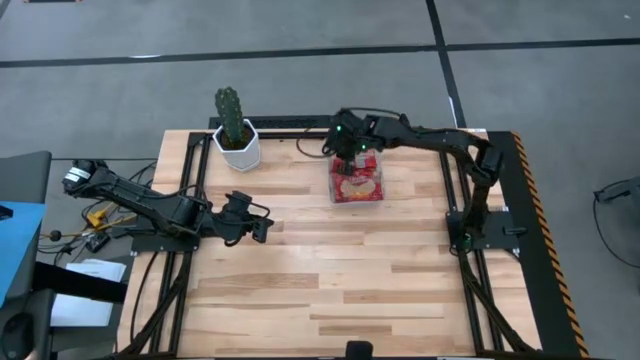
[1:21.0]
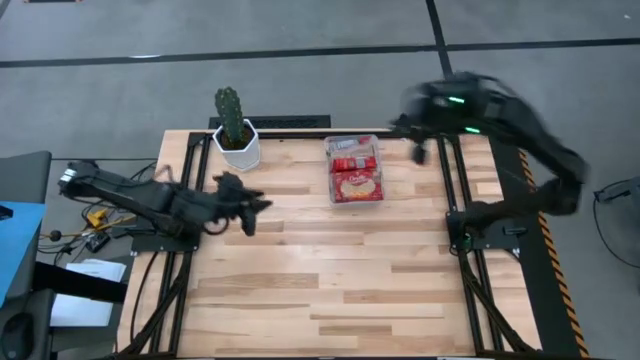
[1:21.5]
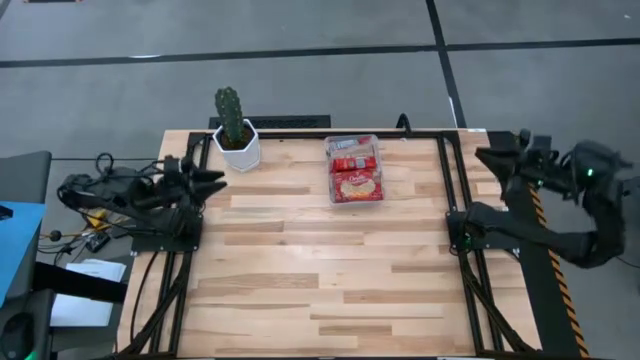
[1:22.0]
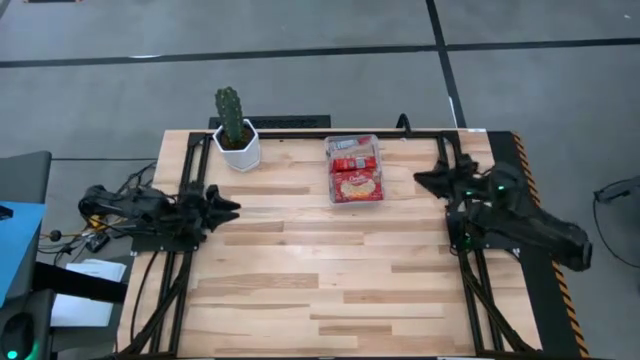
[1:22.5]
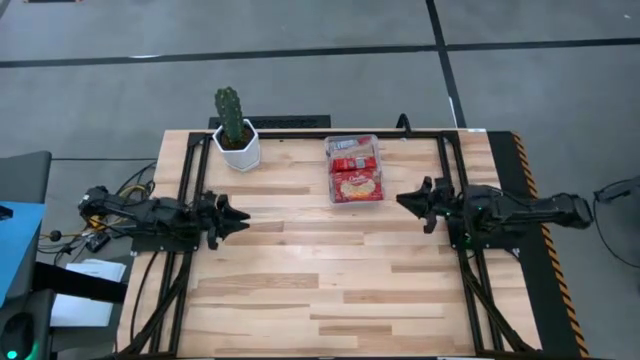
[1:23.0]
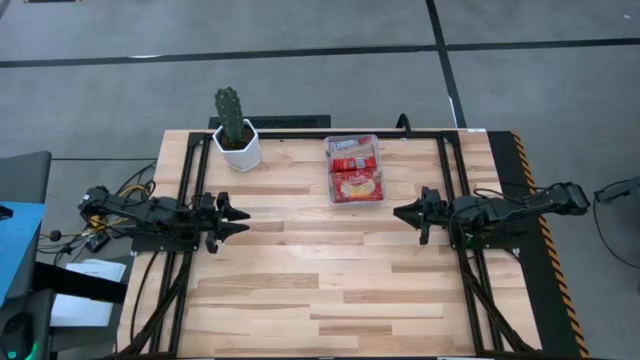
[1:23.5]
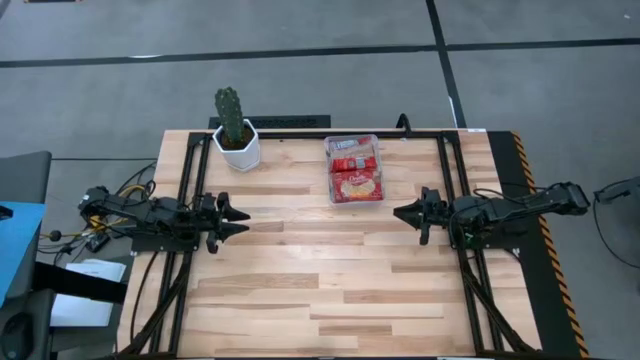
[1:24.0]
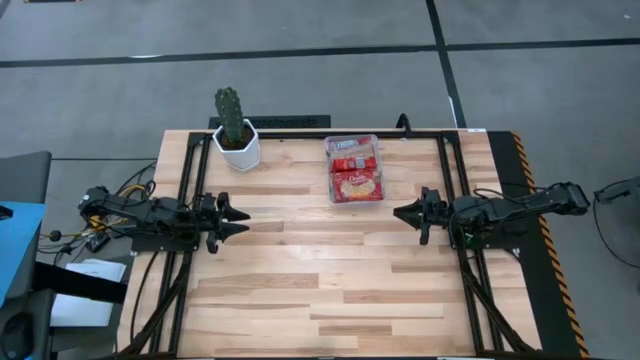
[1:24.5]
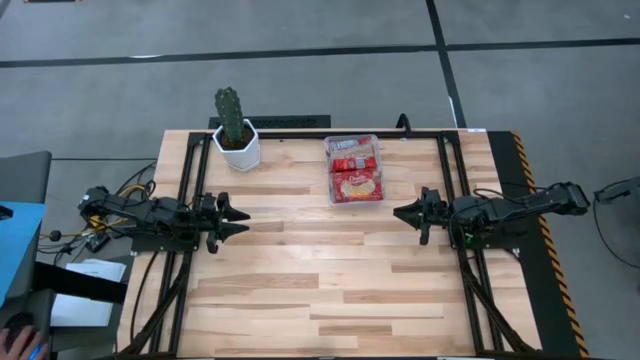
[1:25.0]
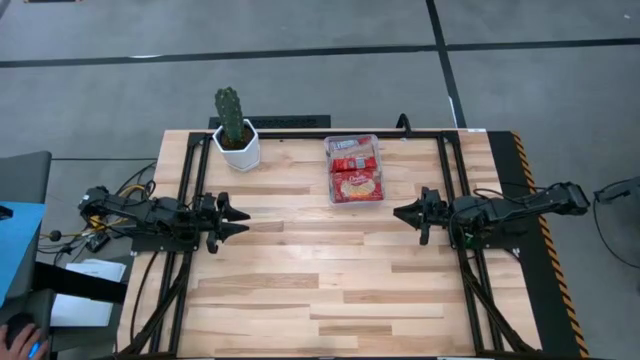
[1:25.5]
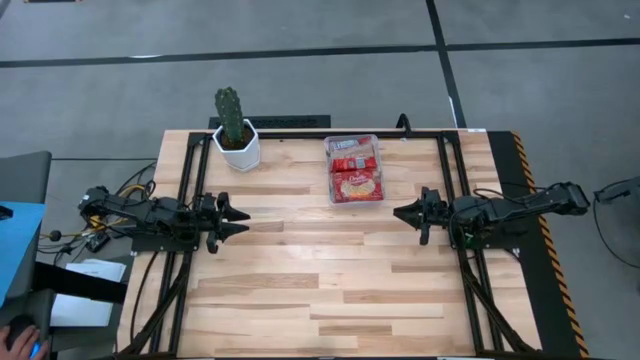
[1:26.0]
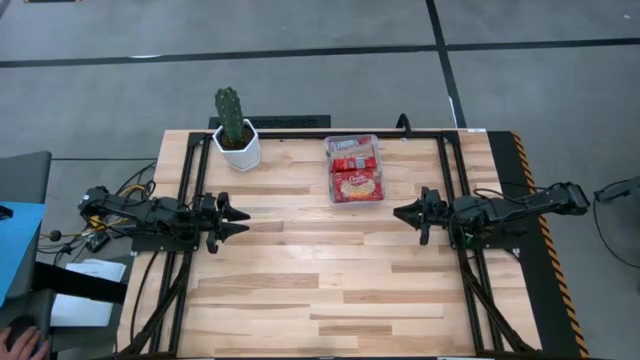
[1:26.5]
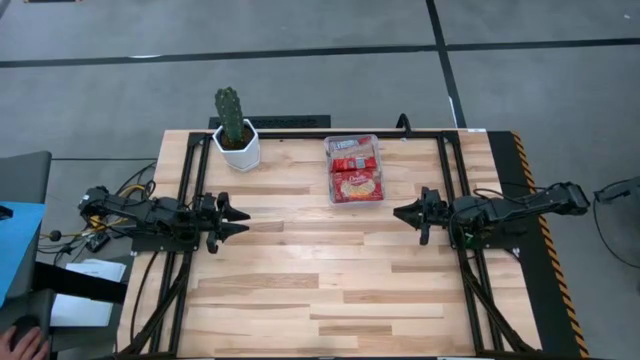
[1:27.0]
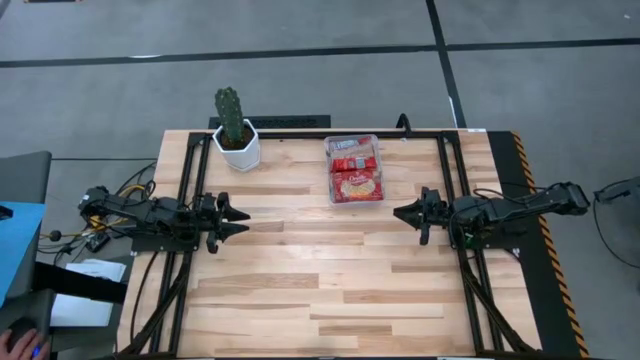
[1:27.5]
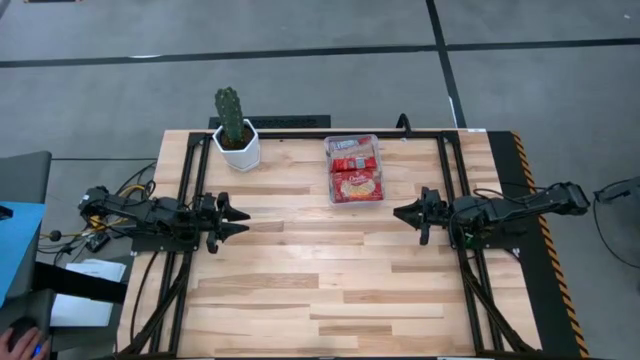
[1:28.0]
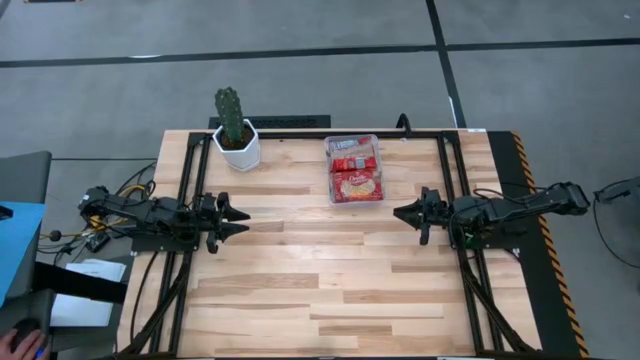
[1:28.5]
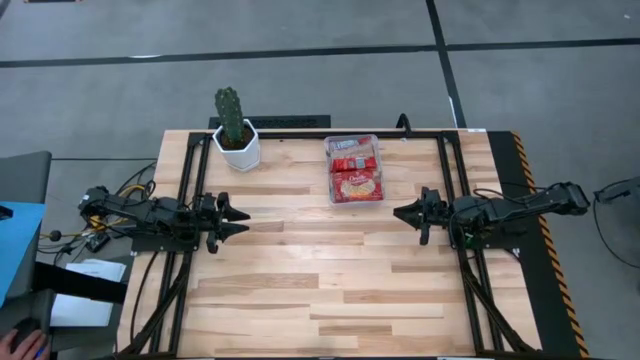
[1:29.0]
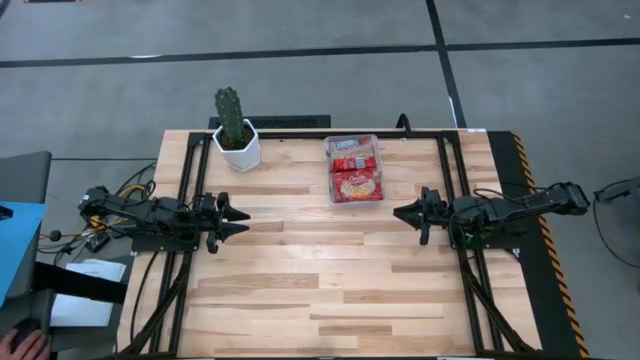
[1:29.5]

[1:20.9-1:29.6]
Task: Sort popcorn bags into baskets
Return to Home Position

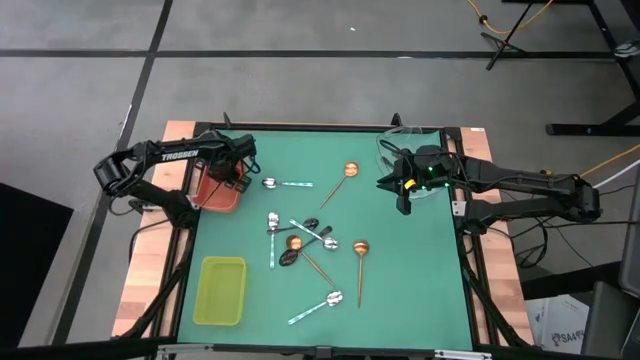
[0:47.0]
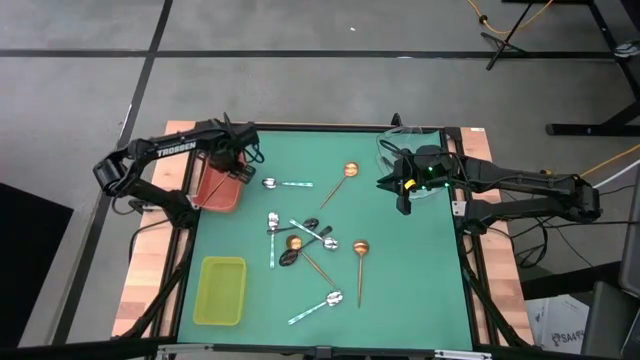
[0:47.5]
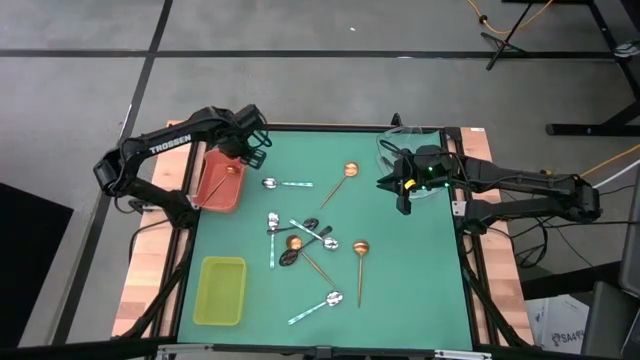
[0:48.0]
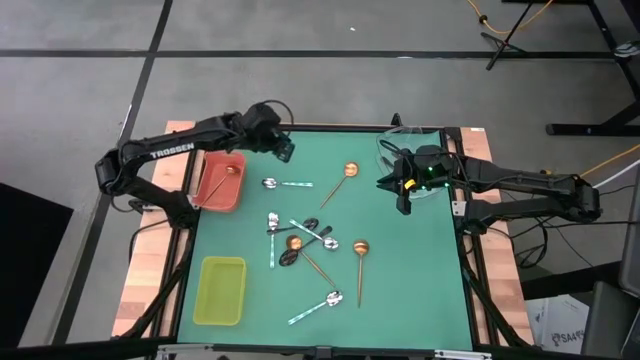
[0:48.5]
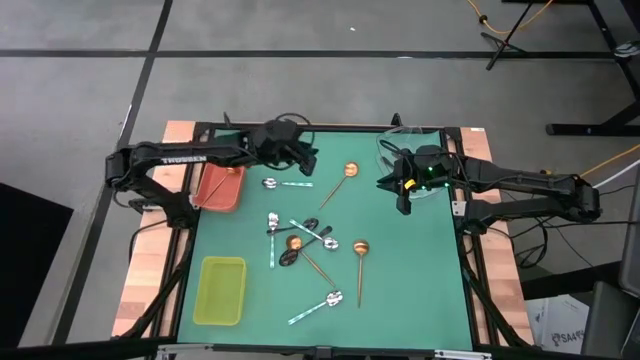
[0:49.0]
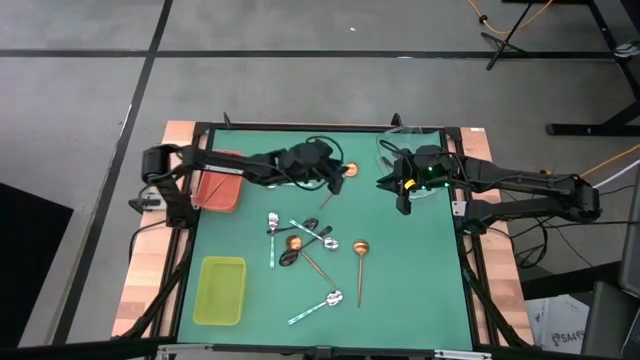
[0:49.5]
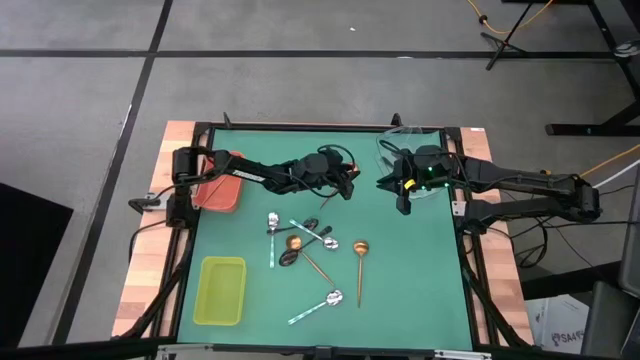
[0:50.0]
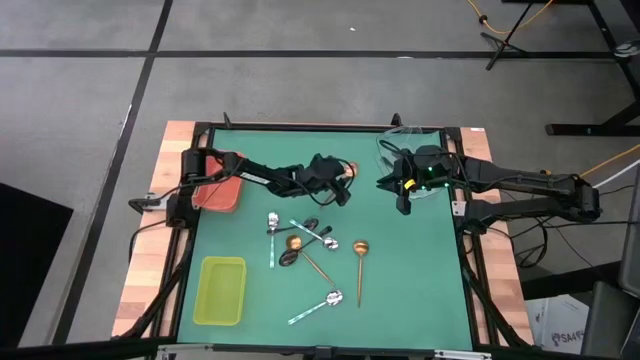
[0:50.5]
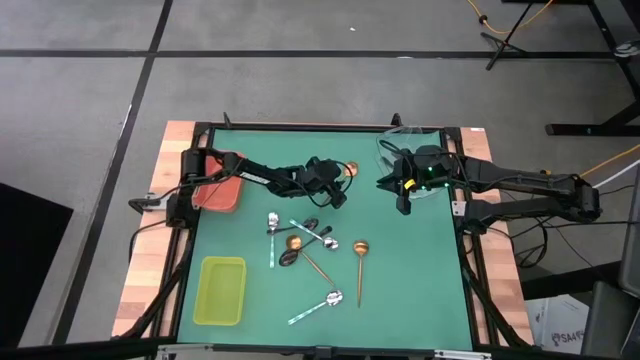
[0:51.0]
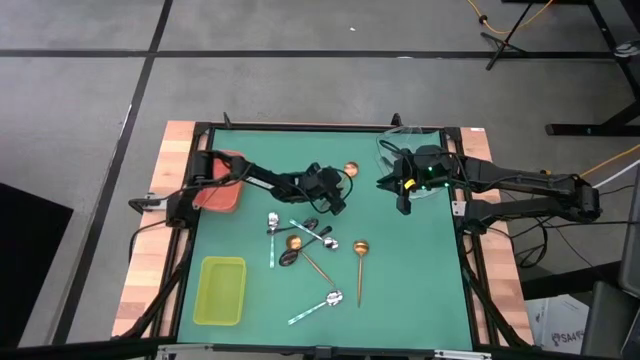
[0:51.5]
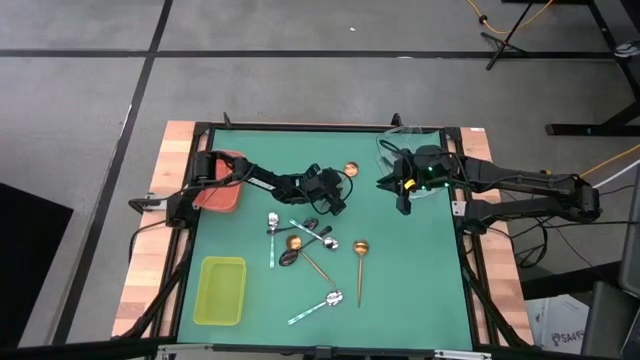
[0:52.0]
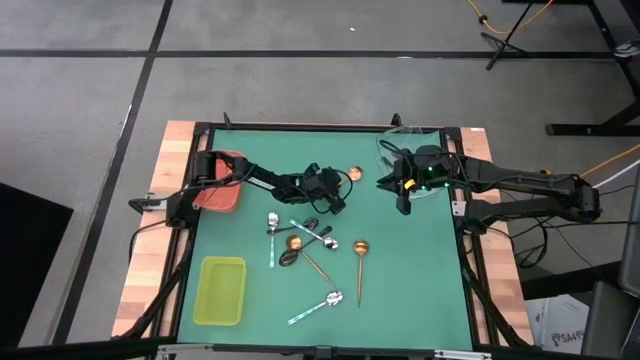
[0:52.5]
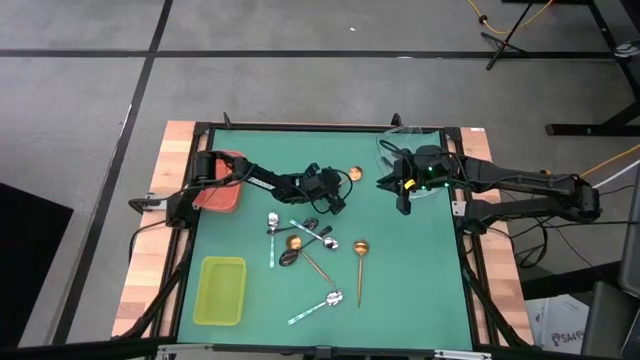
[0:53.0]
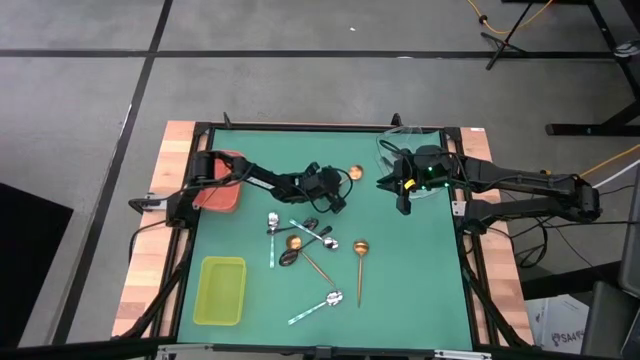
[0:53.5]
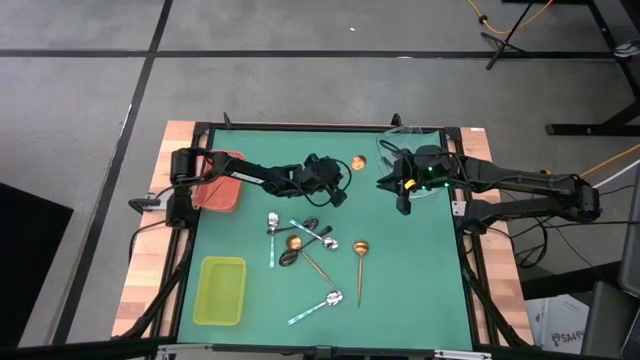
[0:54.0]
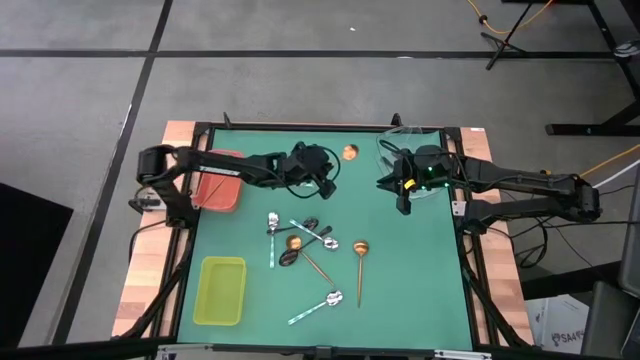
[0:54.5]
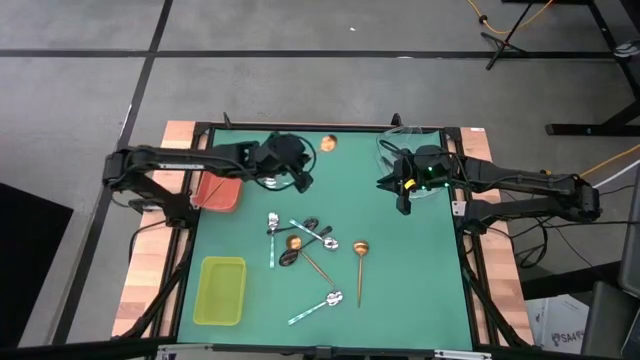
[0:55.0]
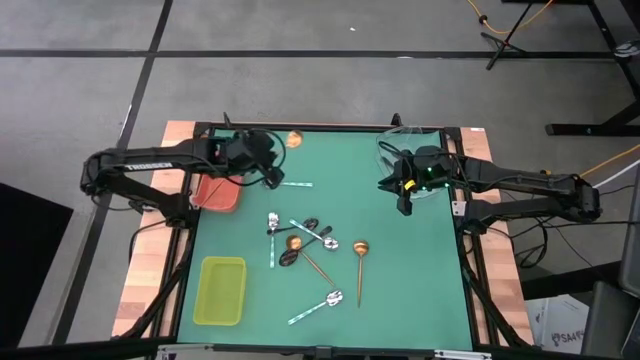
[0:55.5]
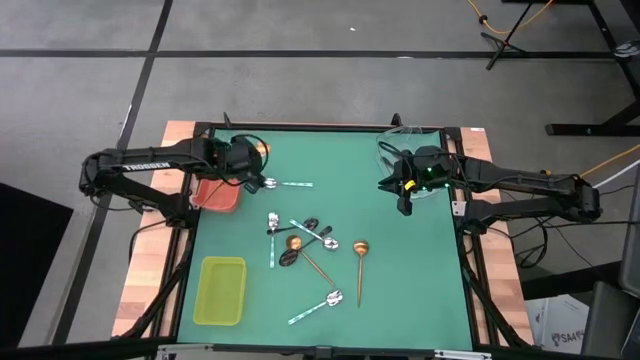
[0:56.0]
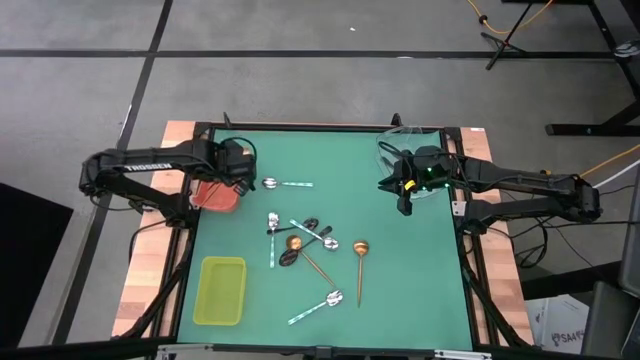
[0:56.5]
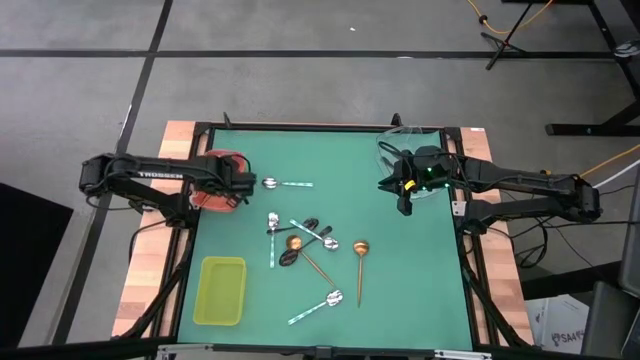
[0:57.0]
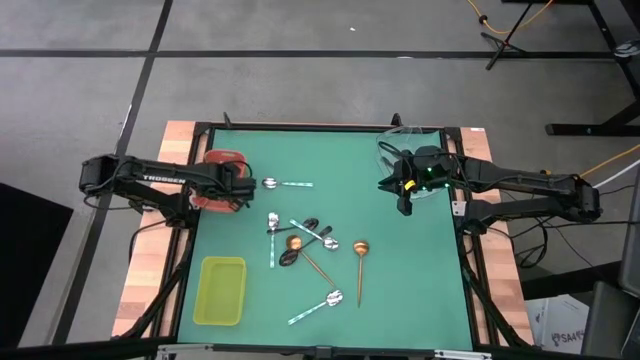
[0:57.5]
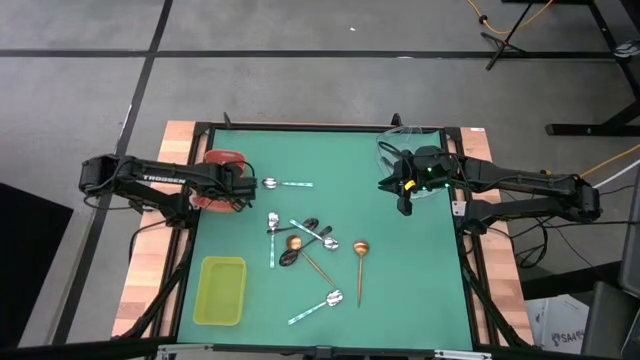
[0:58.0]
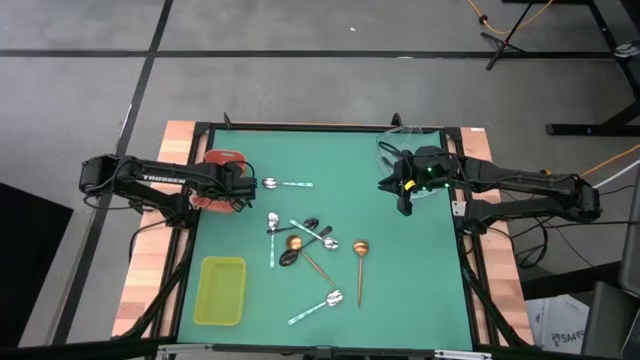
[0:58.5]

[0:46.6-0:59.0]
Task: Sort silverware by color (type)
Put the gold spoon into the orange bin
